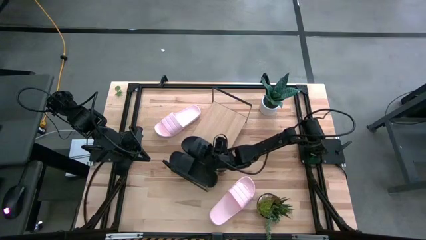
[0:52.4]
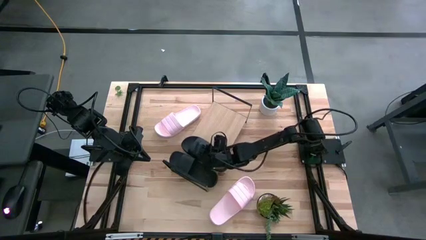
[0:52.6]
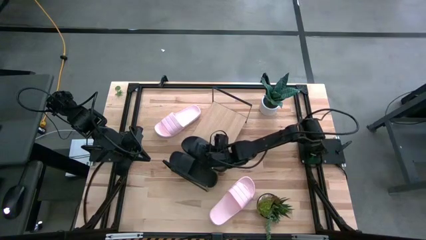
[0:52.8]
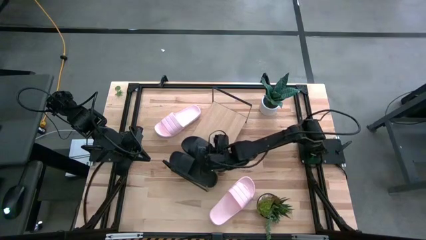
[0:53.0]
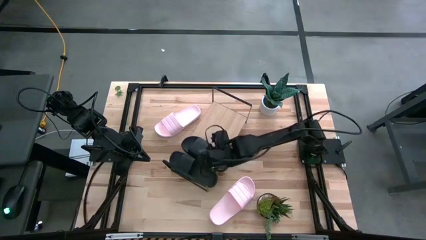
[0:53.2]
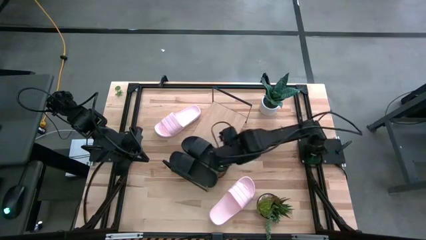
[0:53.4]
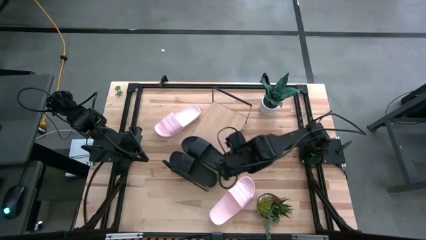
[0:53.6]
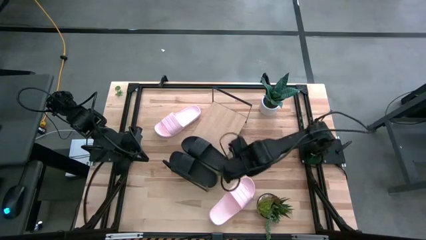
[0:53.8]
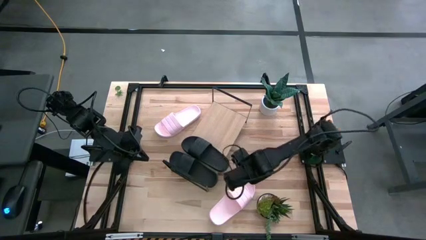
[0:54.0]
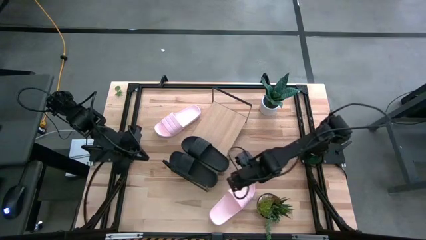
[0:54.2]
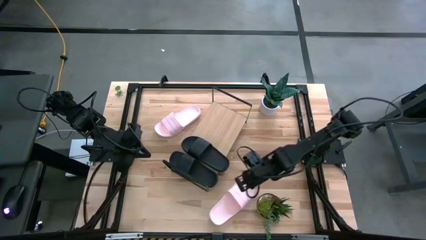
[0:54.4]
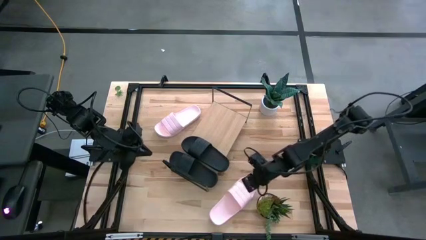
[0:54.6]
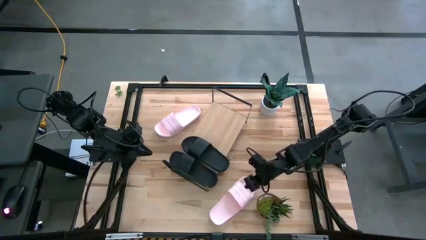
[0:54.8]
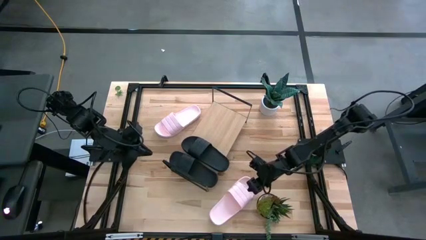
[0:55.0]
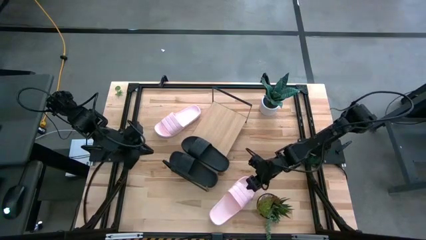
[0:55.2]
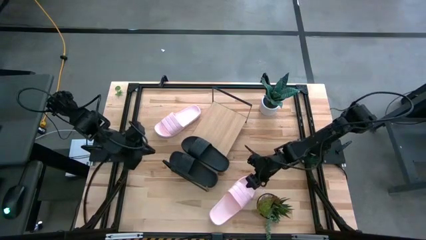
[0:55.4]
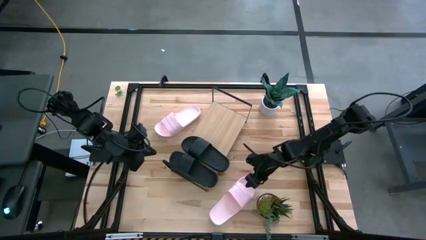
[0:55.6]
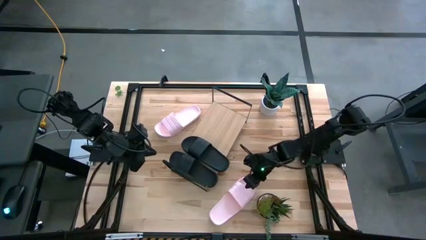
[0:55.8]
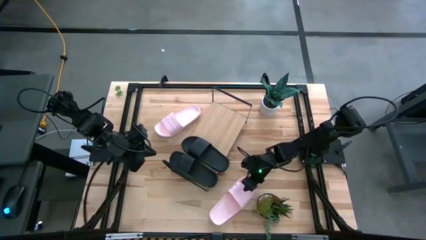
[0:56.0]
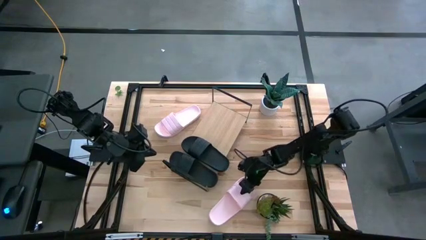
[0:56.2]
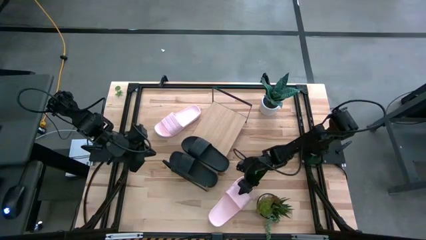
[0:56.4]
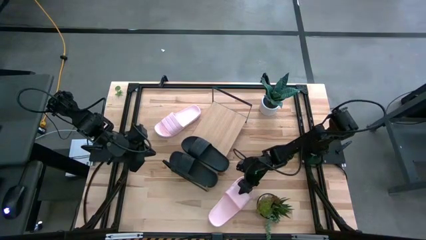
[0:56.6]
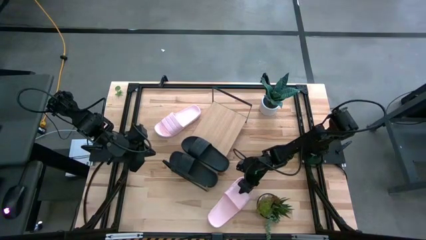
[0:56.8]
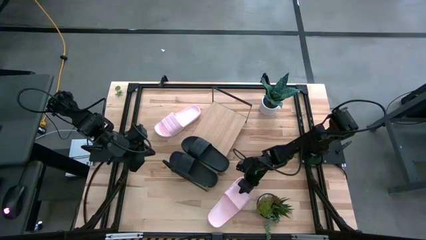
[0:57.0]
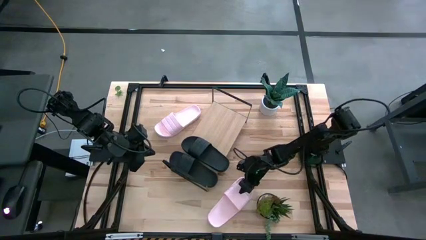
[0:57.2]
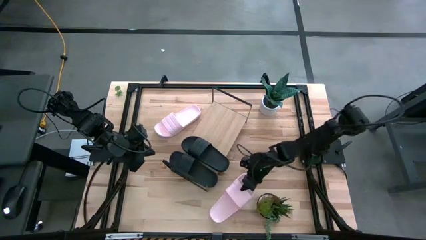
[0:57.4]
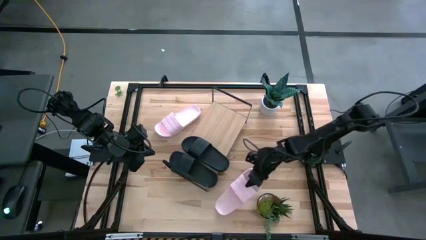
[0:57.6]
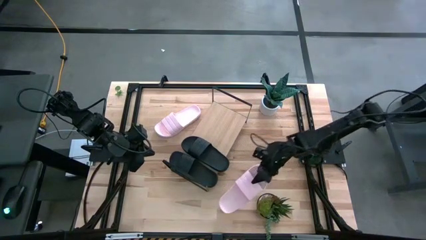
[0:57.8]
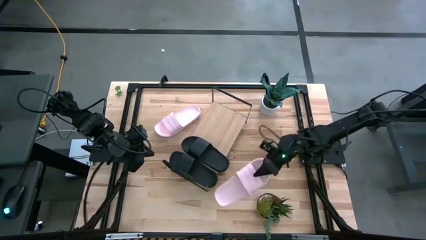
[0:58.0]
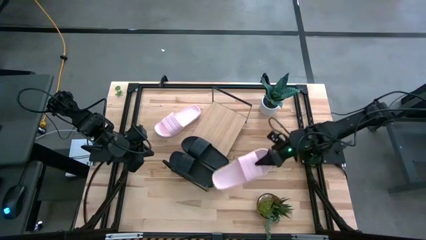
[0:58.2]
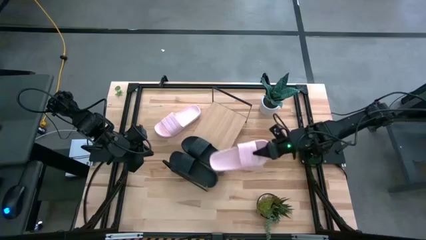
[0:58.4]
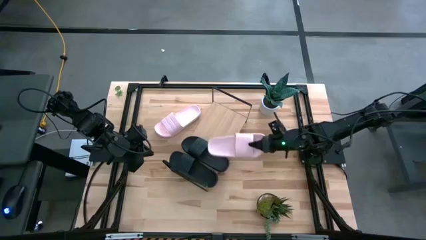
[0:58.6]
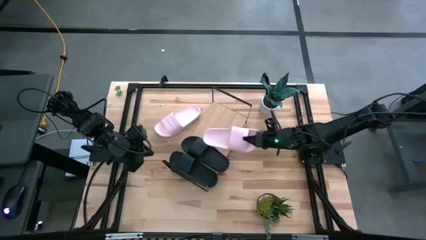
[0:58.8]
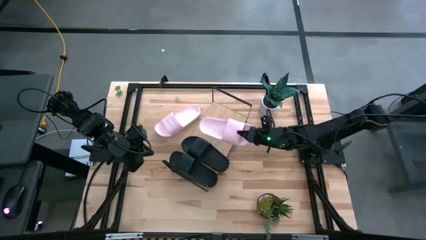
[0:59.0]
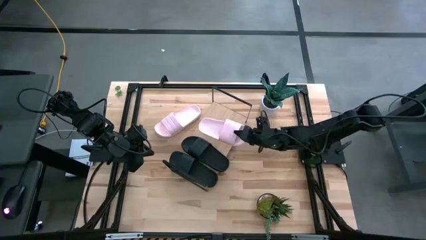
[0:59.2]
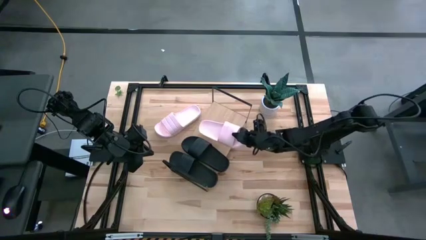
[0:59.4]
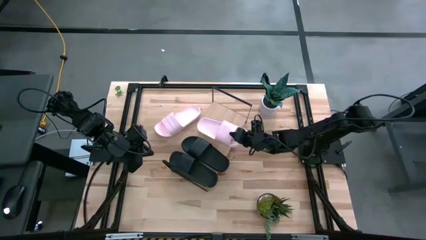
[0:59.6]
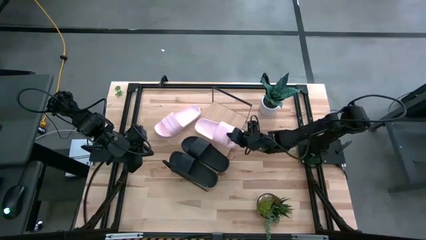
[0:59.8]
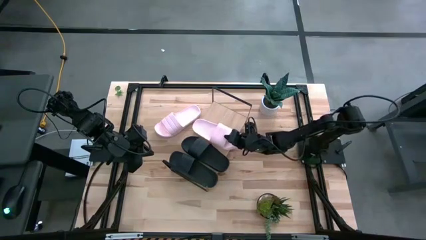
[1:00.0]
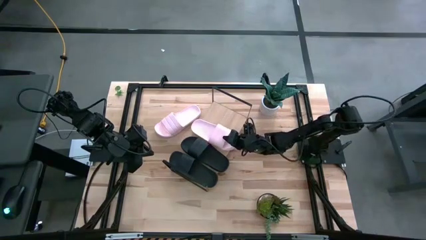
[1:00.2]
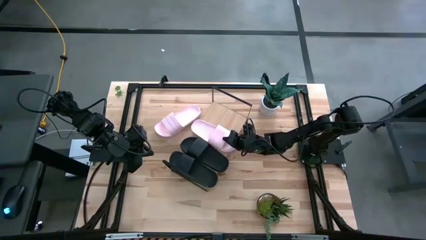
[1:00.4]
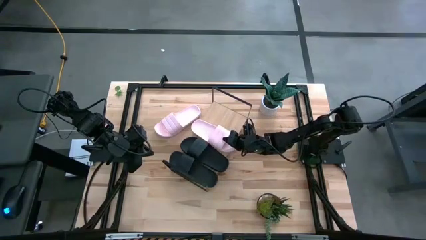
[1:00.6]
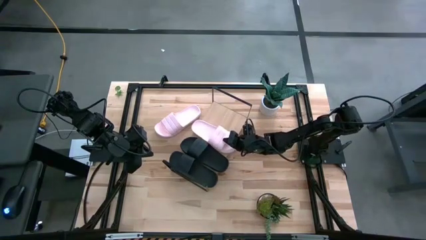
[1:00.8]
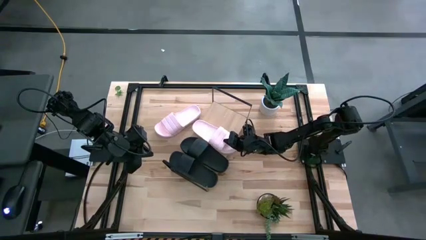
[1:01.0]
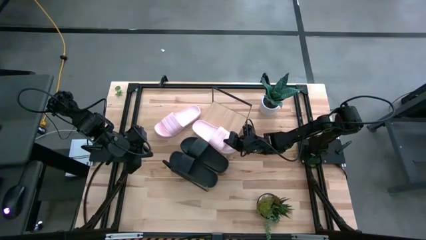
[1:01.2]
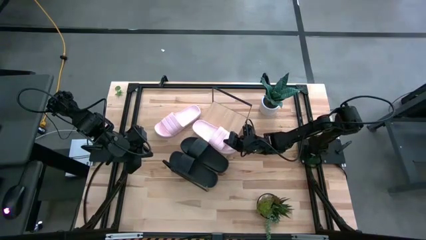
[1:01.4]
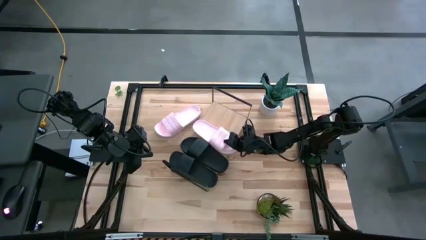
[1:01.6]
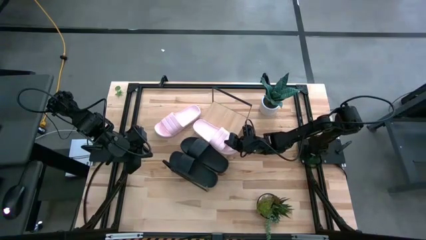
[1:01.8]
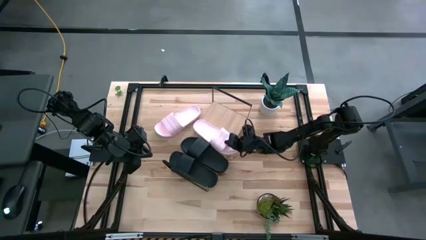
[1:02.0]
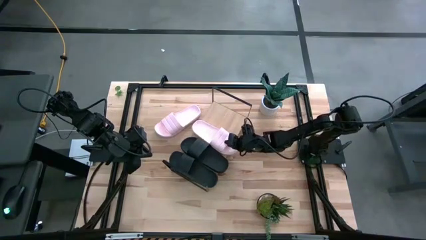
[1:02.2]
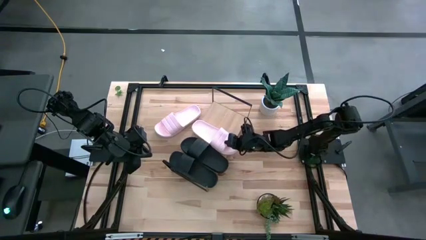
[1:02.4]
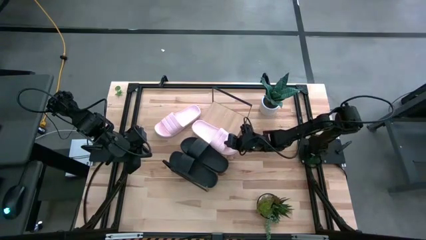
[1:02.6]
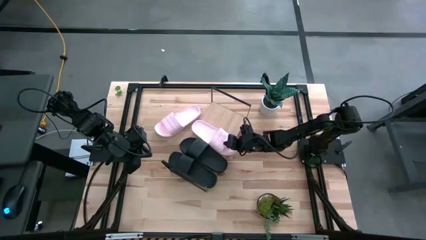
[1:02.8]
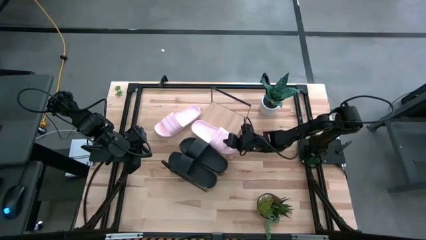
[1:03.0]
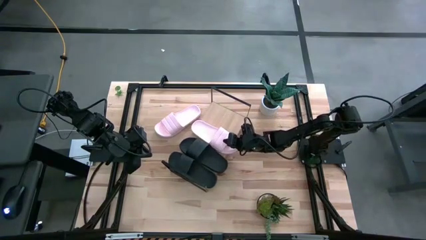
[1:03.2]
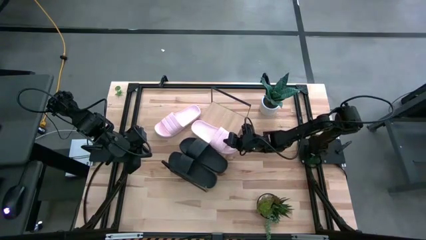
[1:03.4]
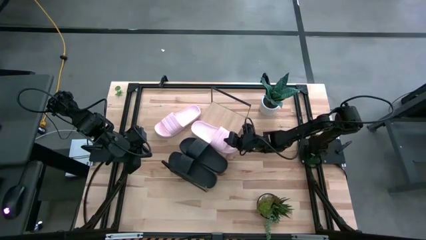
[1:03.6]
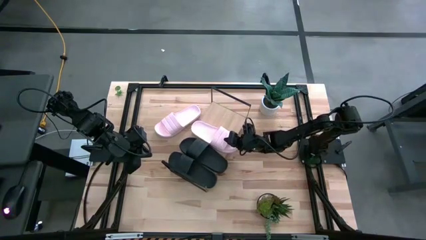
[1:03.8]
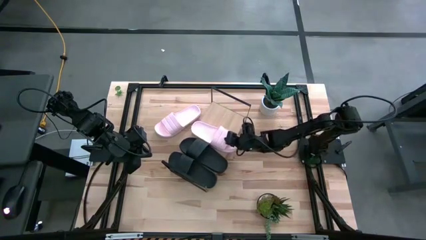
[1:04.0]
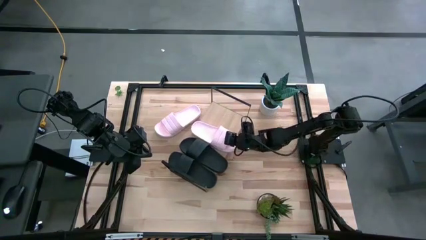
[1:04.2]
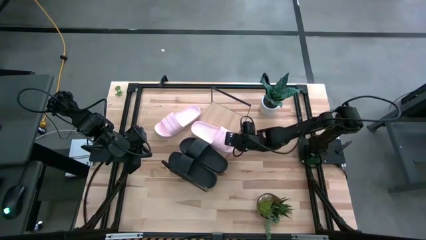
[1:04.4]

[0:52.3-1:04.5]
Task: Pick and place slides into the shelf
Put the bottom pink slipper on the shelf
